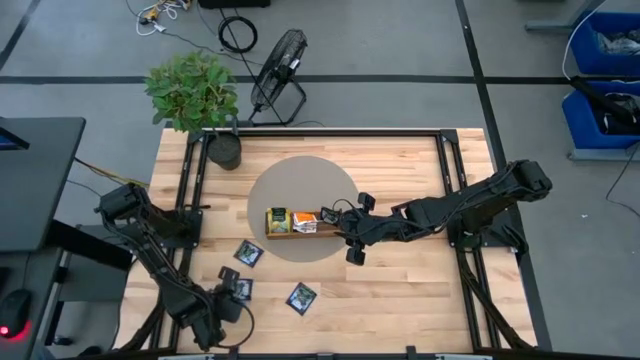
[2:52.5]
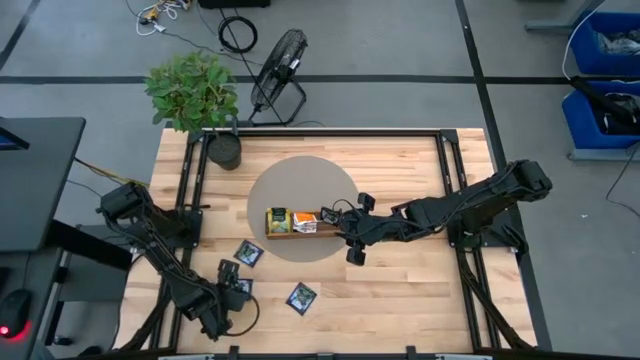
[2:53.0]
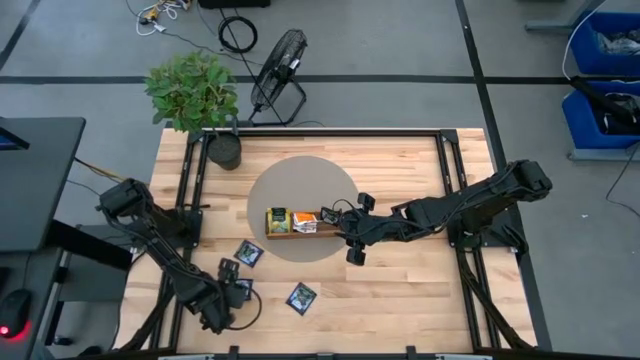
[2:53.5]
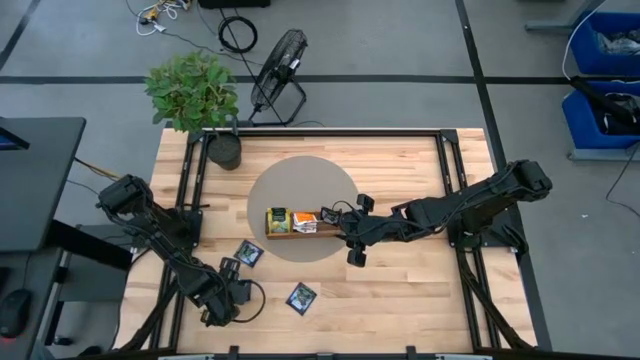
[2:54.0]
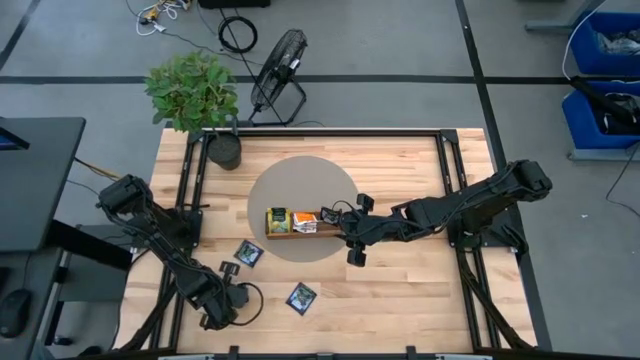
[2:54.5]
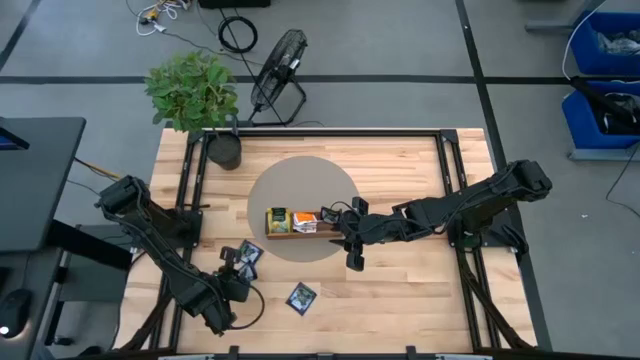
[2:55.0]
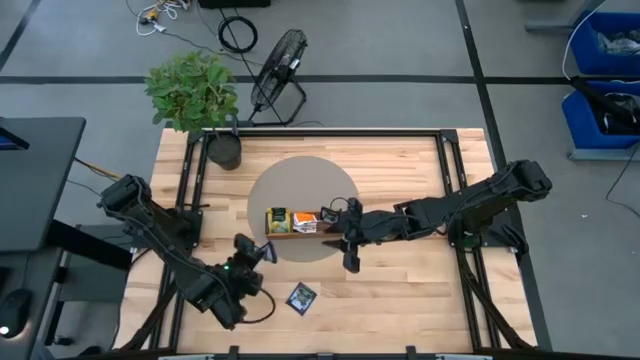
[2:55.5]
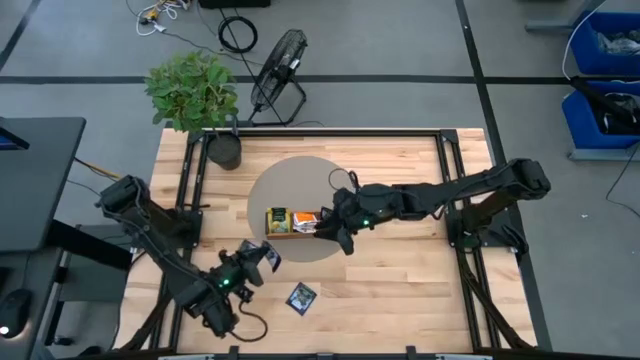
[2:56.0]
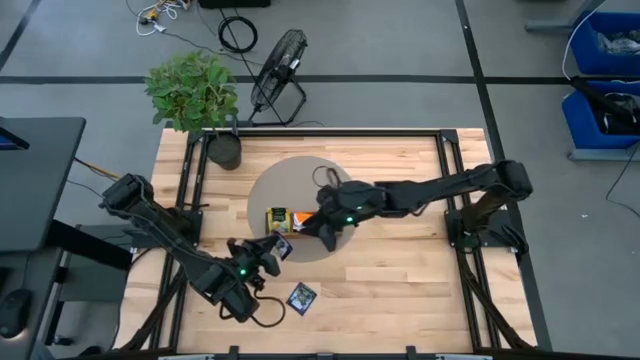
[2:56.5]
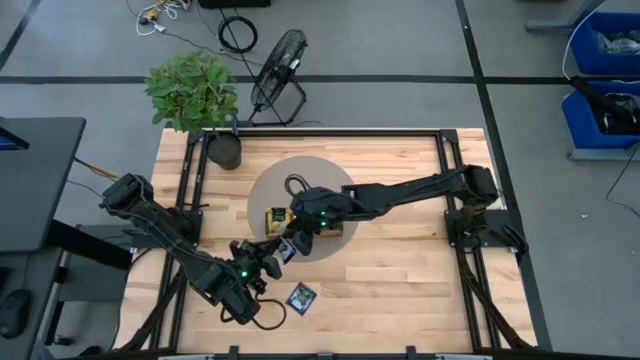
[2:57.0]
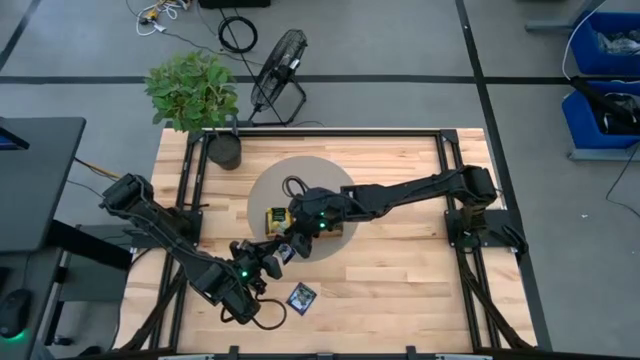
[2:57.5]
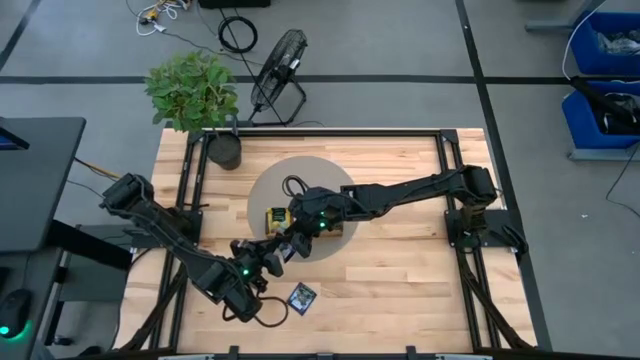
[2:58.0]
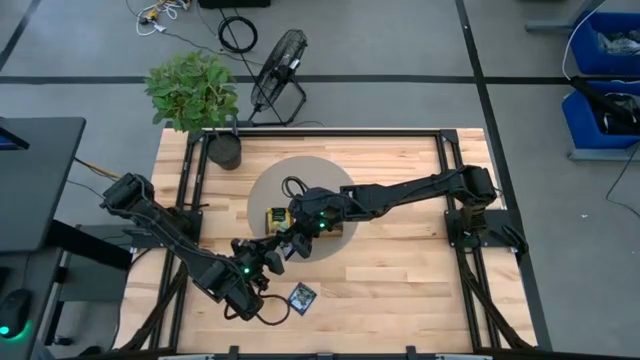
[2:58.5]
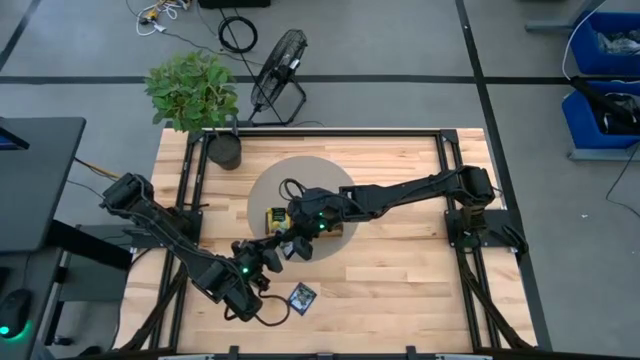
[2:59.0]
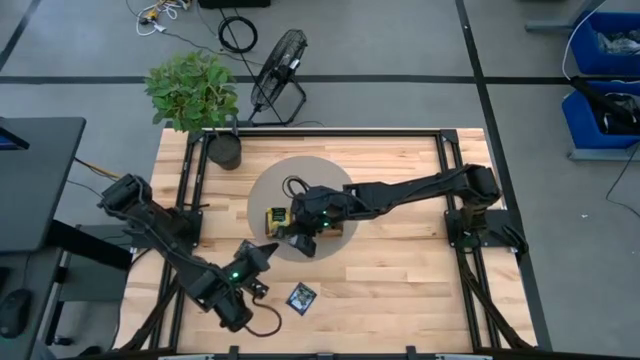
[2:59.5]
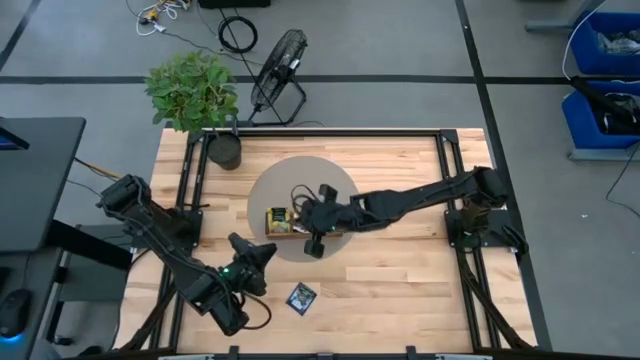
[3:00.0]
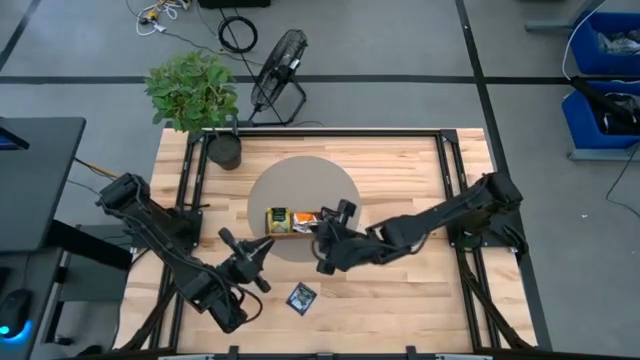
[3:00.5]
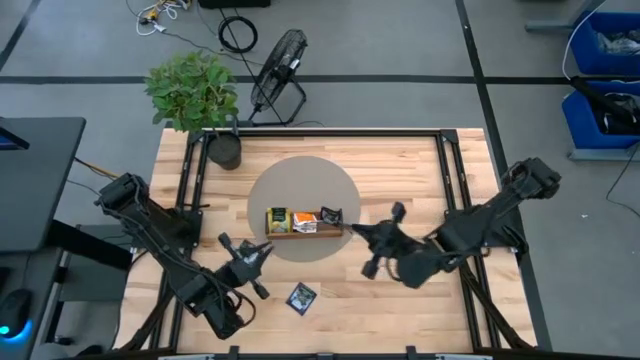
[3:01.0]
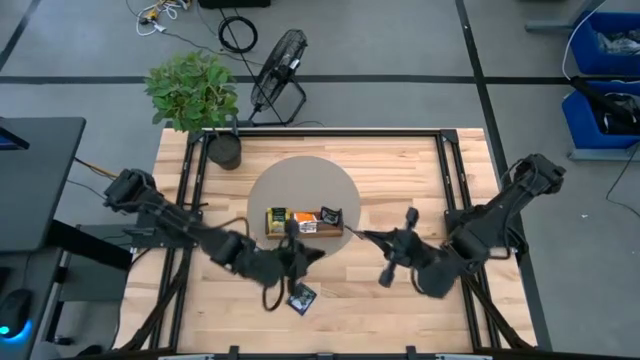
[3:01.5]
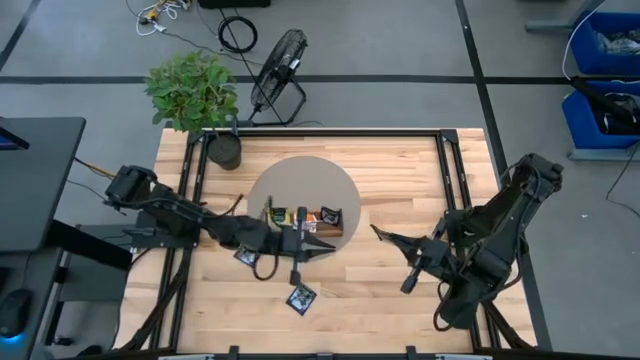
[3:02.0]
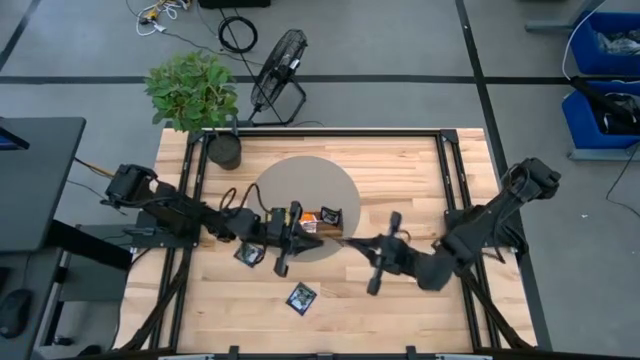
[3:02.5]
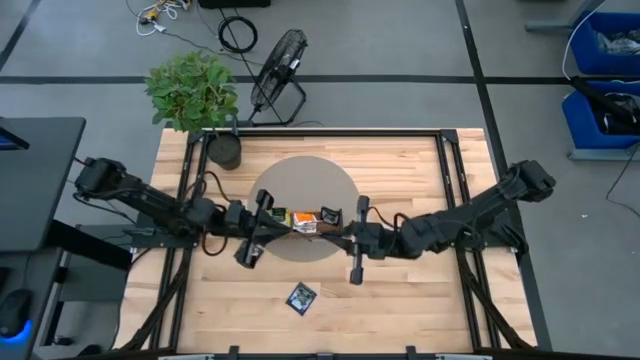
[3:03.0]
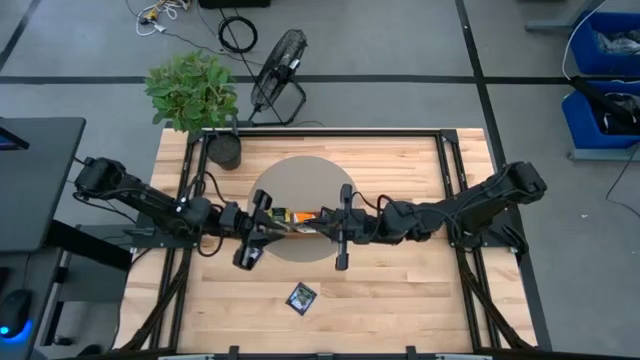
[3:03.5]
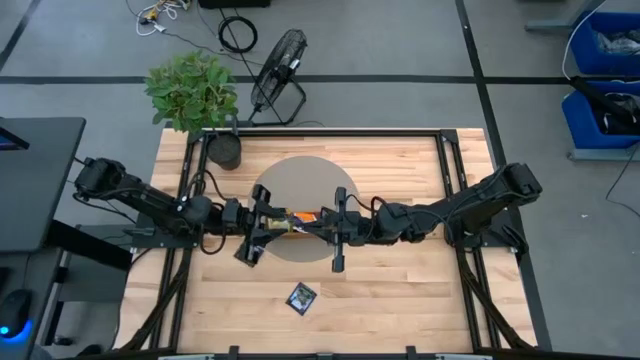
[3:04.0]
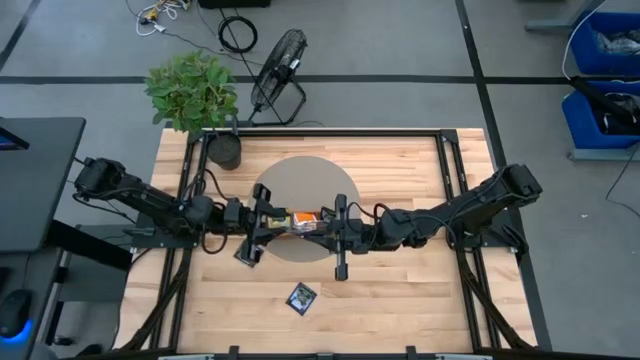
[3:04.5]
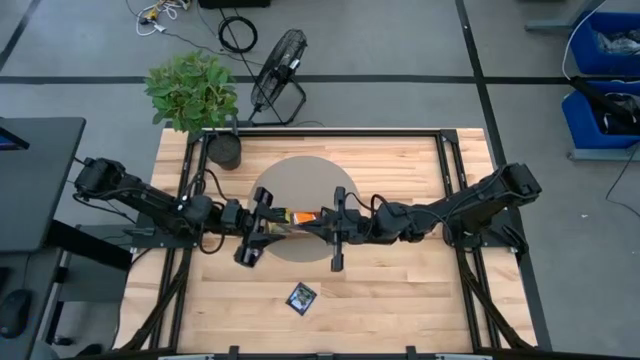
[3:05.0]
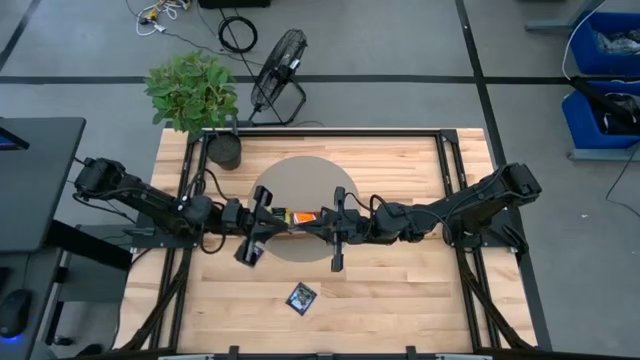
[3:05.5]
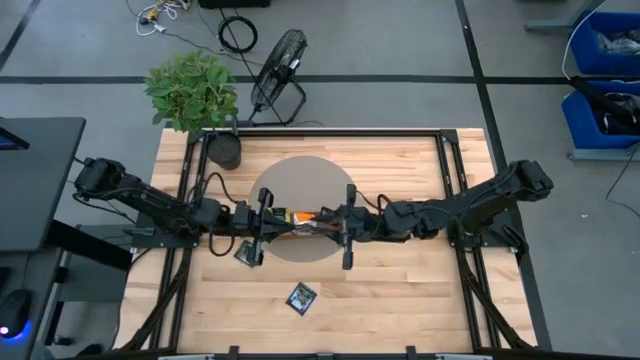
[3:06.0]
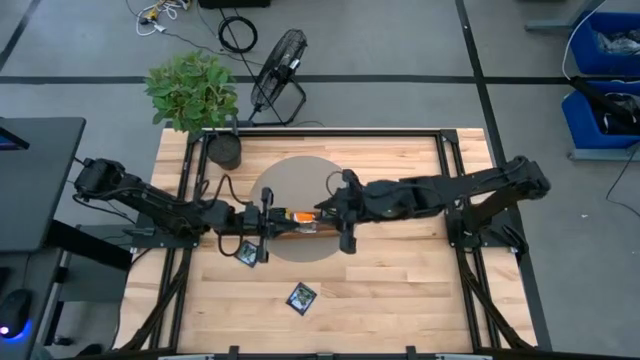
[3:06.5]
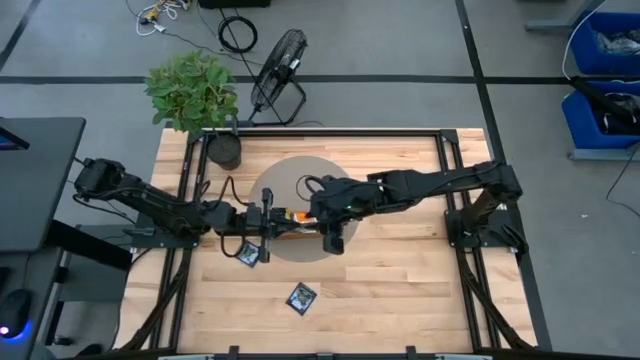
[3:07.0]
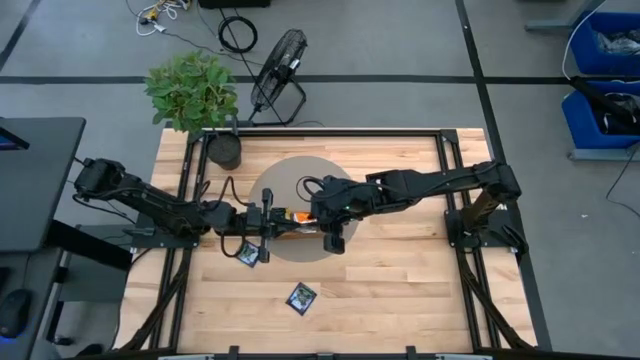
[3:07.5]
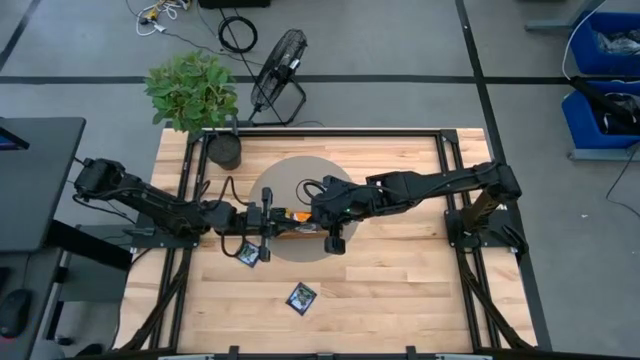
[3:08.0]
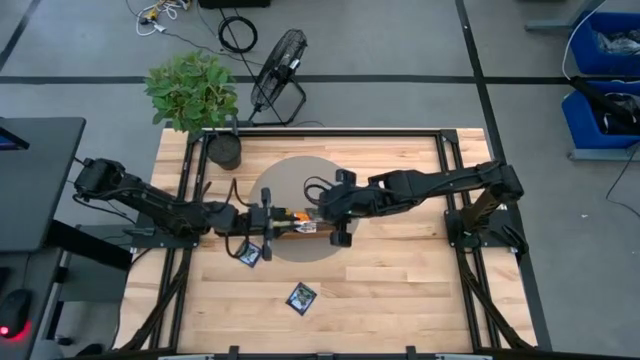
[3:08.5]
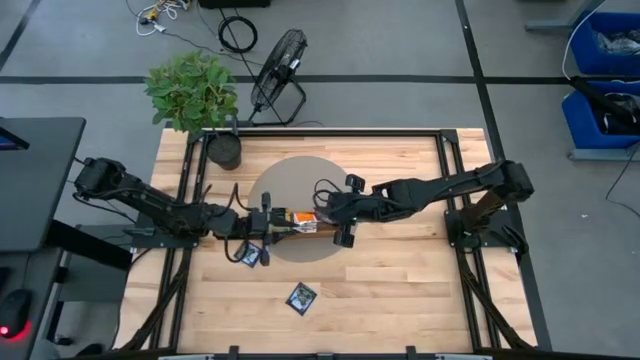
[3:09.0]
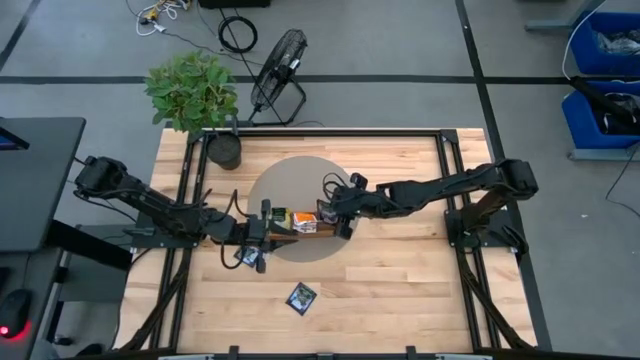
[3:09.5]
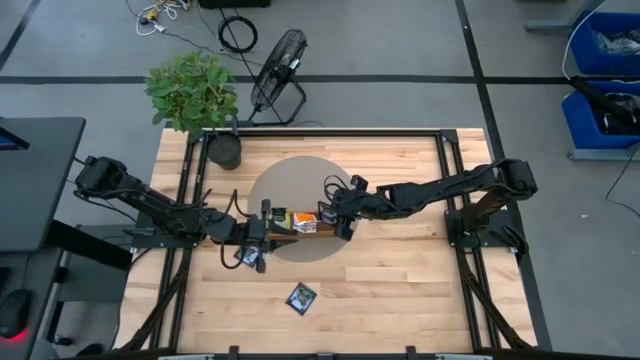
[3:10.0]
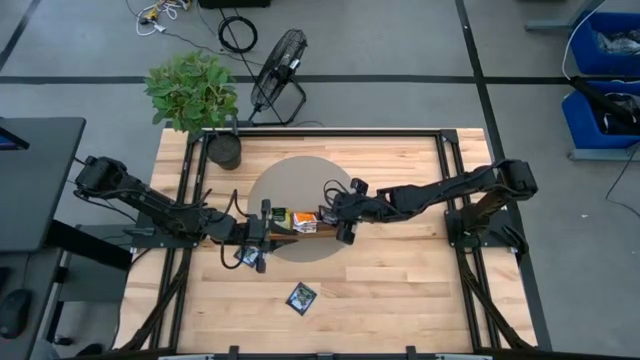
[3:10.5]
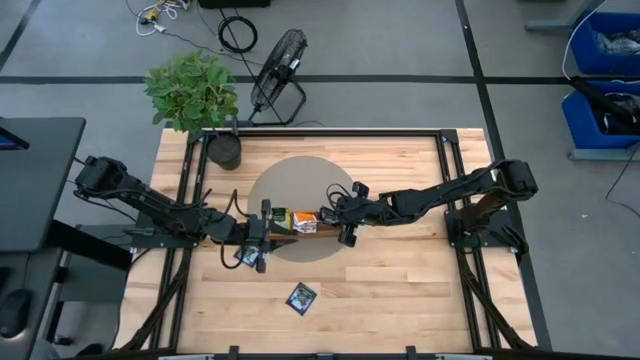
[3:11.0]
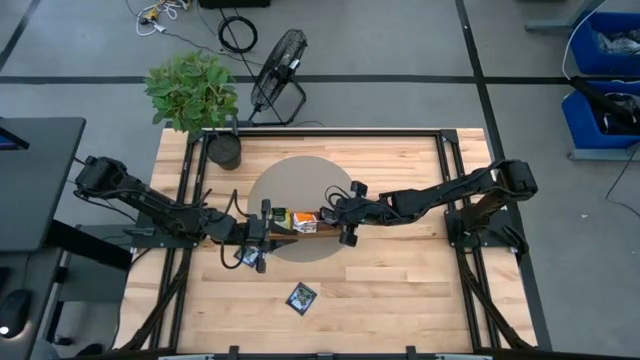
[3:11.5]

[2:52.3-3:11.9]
Task: Pick & Place Tea
Put the left violet tea bag into the wooden organizer
